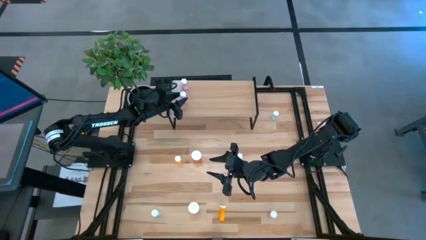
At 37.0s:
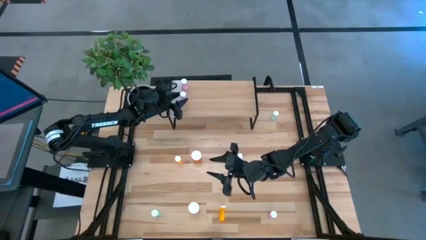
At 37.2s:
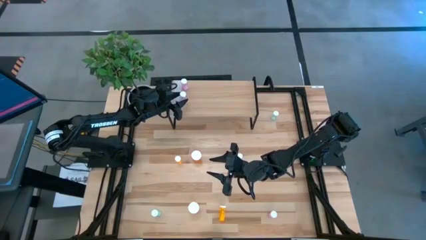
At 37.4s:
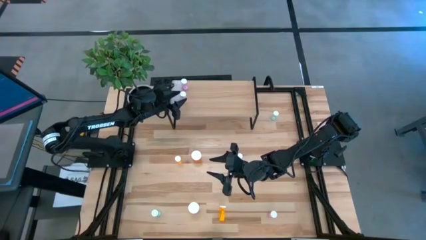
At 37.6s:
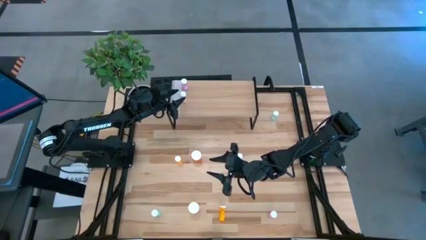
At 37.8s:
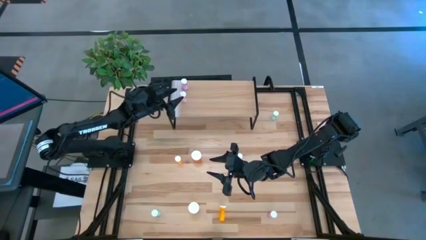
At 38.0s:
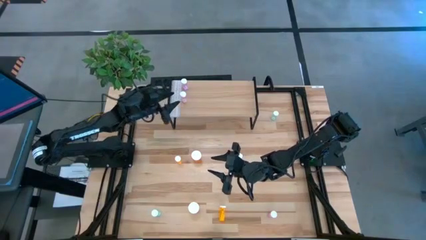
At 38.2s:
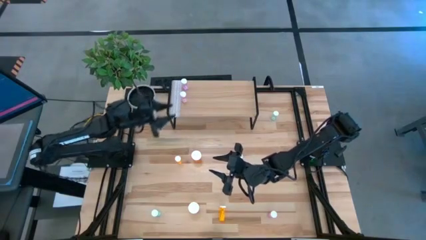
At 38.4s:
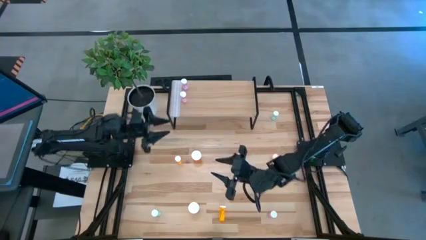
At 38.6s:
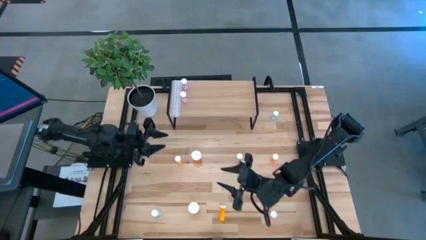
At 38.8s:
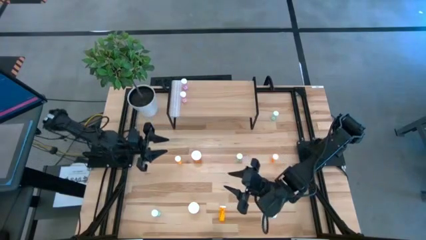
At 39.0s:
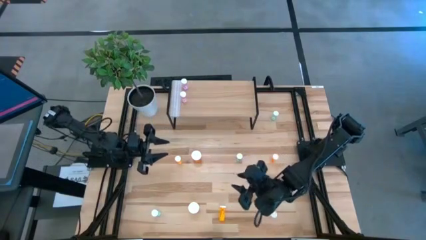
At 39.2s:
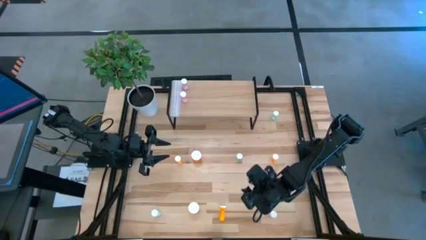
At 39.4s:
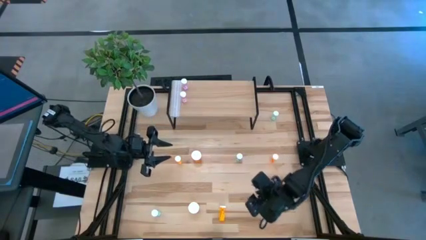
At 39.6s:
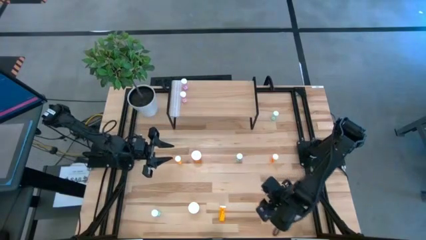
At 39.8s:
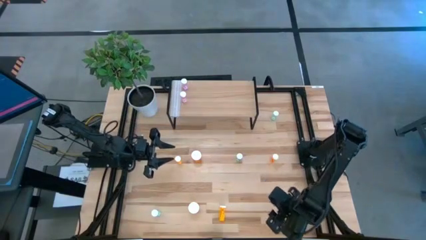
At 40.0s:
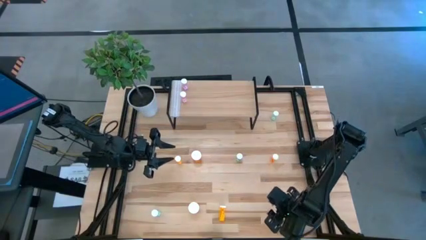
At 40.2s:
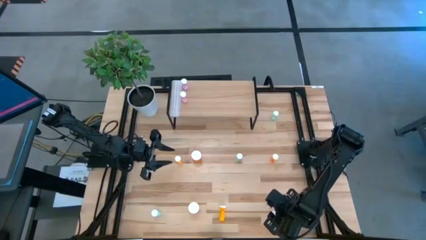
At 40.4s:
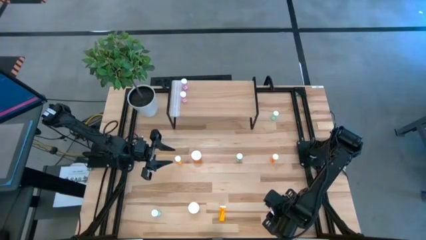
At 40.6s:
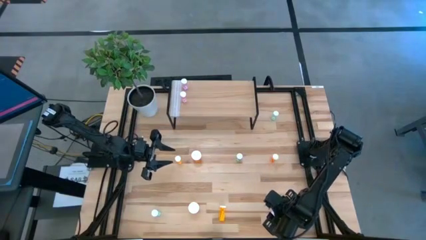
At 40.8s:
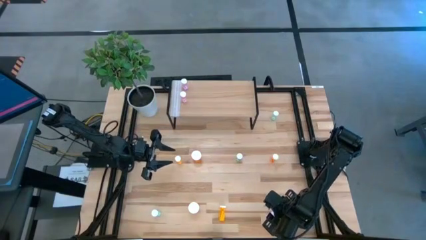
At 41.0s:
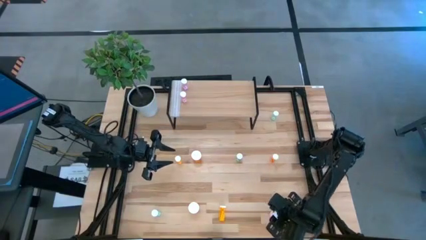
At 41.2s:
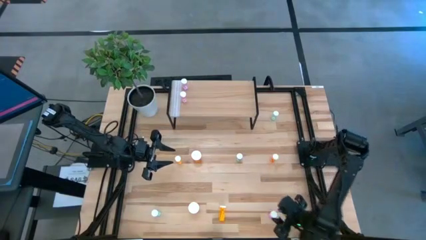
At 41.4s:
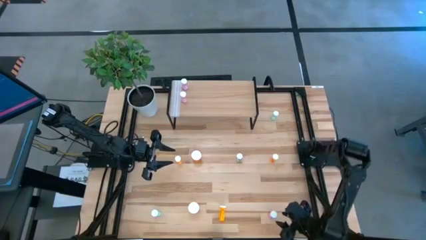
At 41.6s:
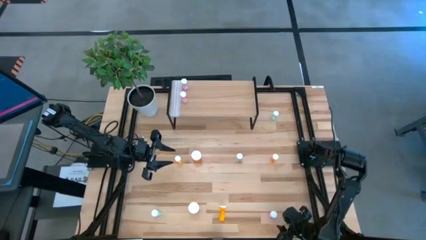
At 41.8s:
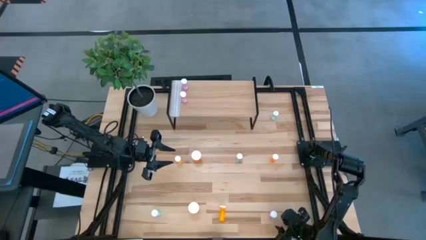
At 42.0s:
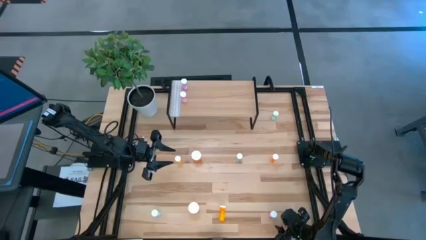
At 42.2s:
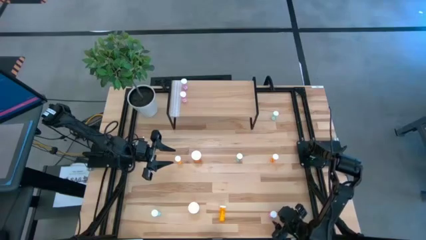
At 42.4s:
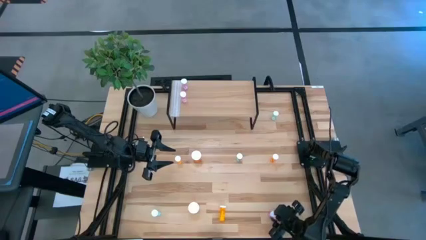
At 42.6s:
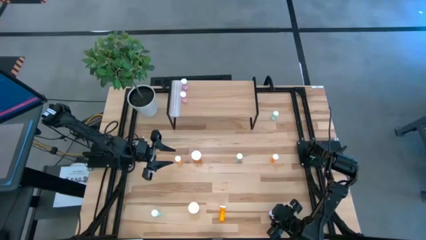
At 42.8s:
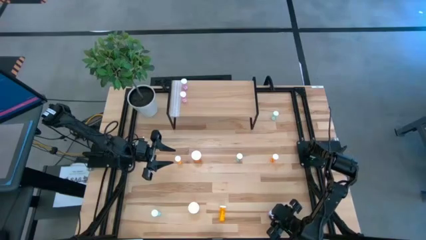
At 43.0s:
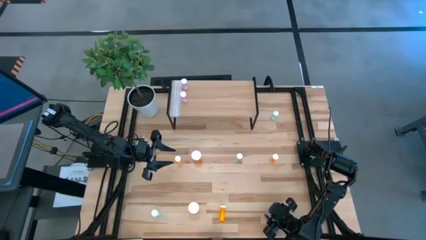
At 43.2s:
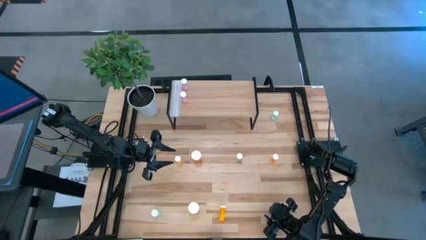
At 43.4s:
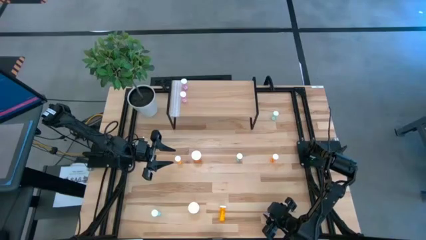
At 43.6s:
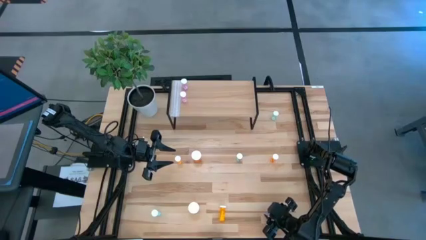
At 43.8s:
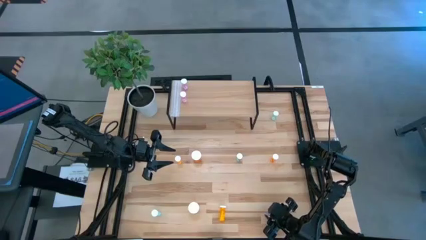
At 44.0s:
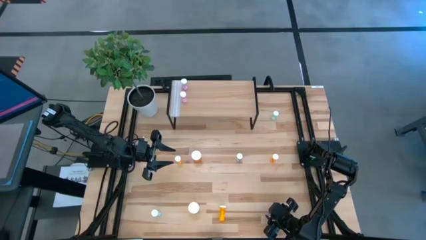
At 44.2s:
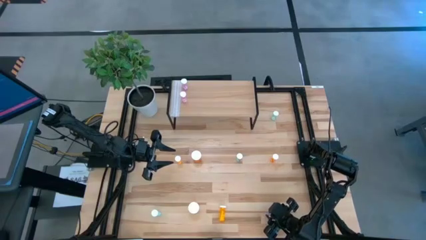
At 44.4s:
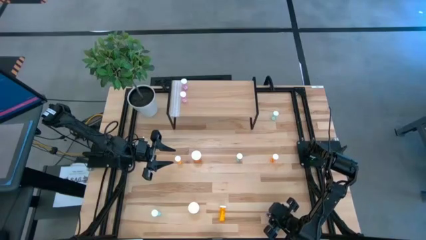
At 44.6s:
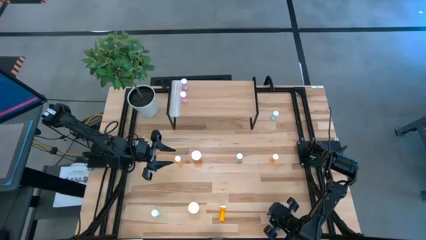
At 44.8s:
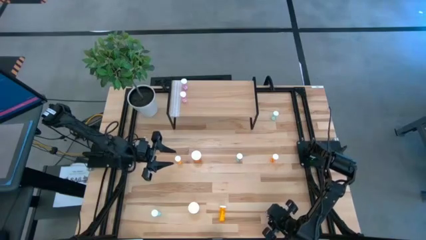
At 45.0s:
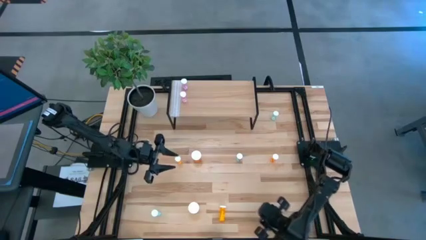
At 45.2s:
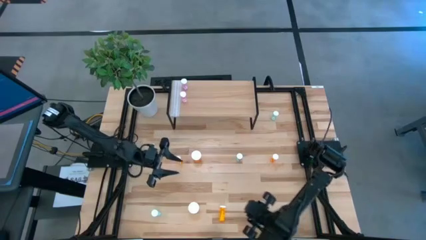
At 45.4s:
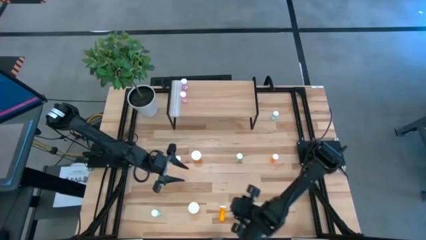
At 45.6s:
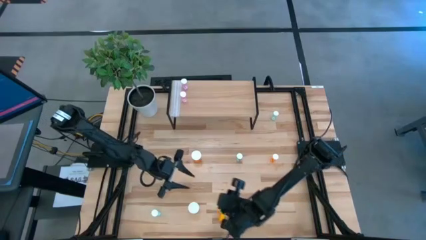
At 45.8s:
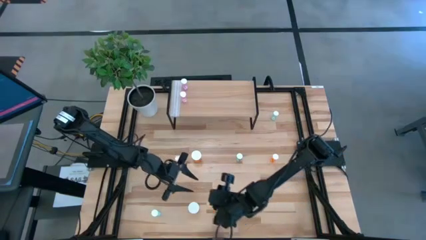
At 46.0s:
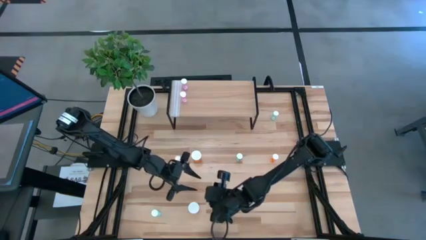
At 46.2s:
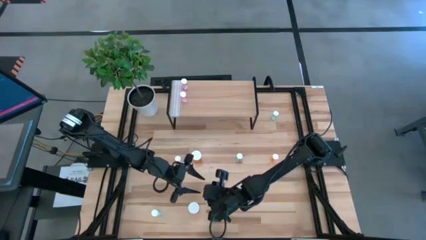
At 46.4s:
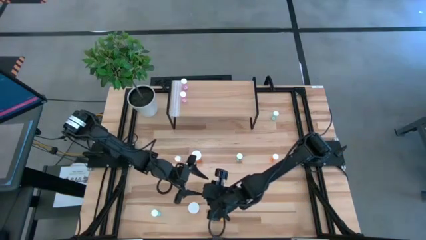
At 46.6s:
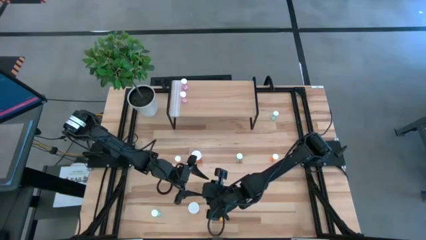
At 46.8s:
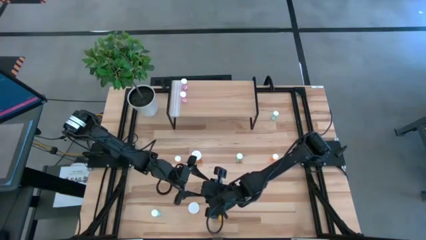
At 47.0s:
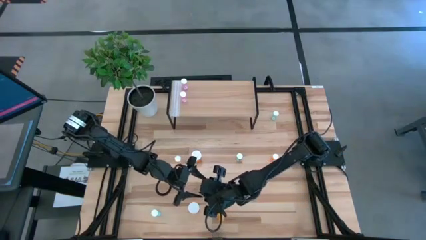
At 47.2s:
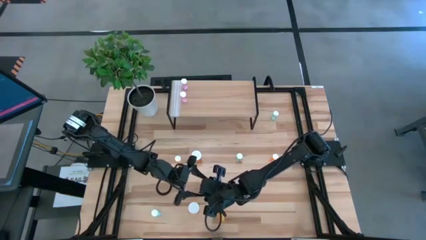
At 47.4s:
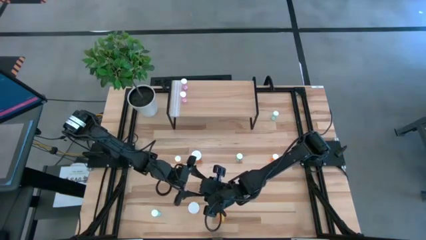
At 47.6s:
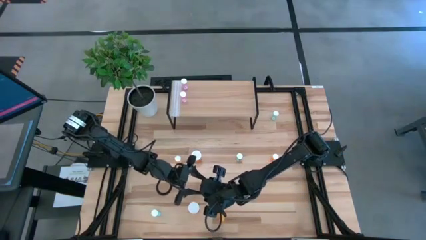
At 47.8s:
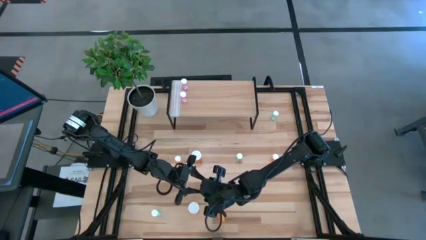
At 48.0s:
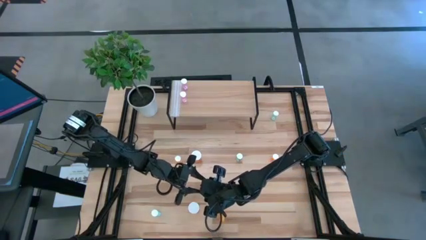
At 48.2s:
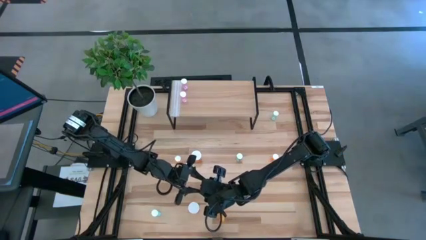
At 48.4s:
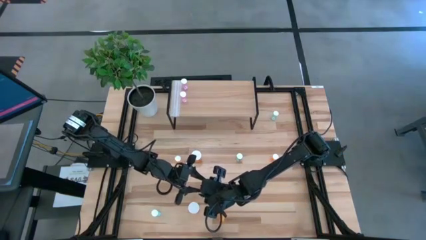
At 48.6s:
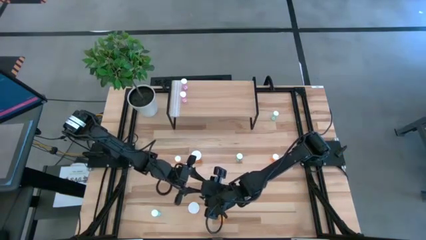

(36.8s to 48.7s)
Task: Pick and place medicine bottles onto shelf by color
Put the pink pill bottle on the shelf aligned with the other pink pill bottles

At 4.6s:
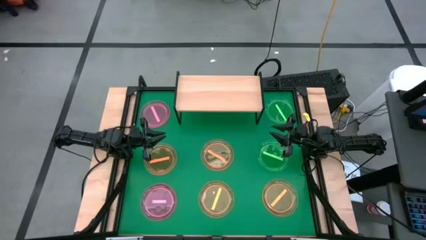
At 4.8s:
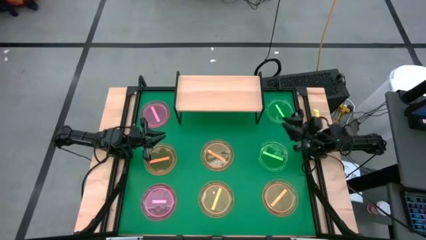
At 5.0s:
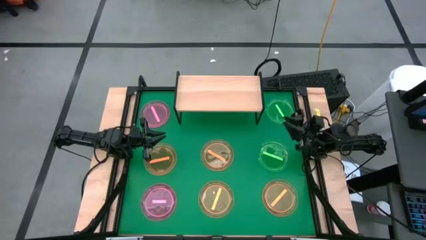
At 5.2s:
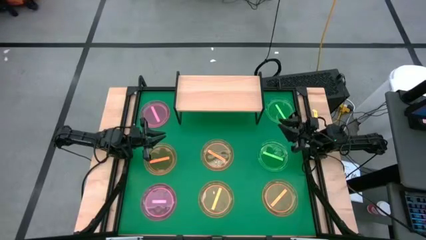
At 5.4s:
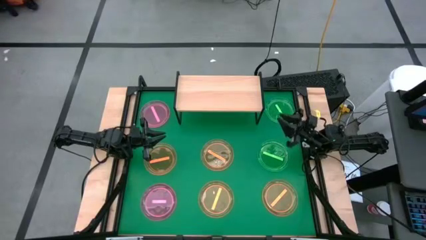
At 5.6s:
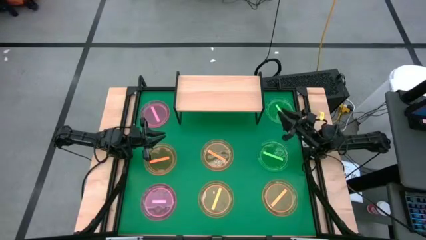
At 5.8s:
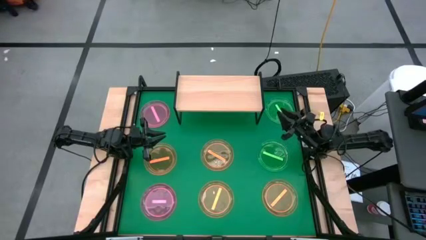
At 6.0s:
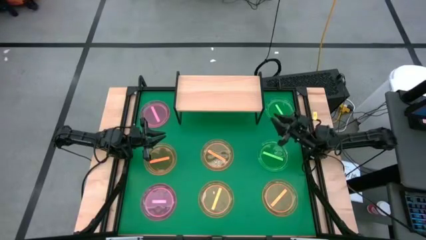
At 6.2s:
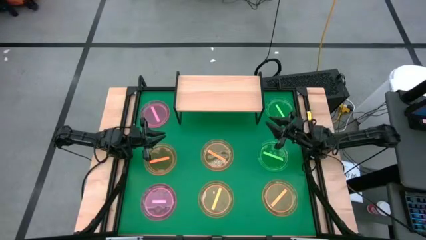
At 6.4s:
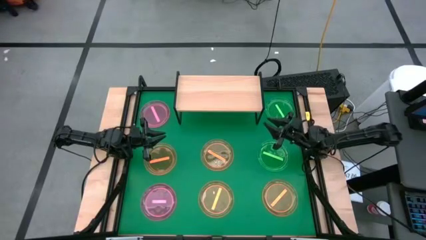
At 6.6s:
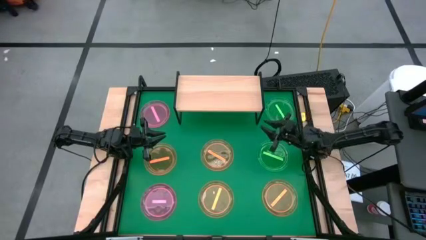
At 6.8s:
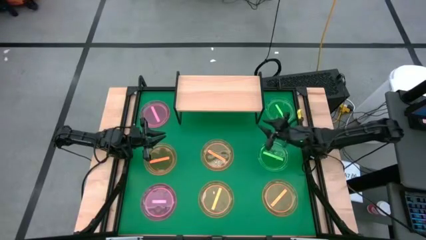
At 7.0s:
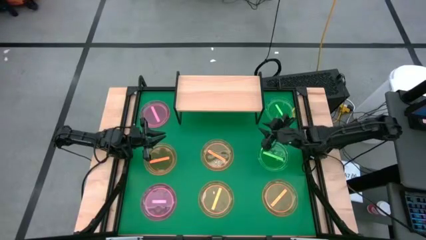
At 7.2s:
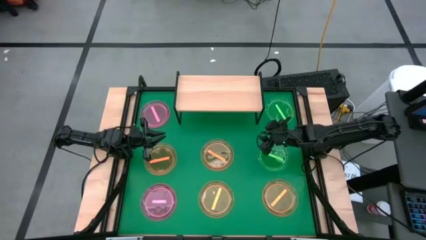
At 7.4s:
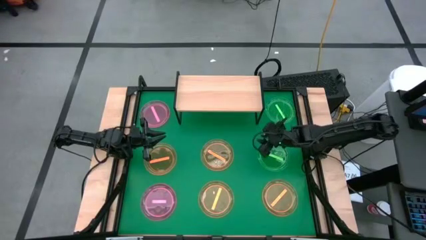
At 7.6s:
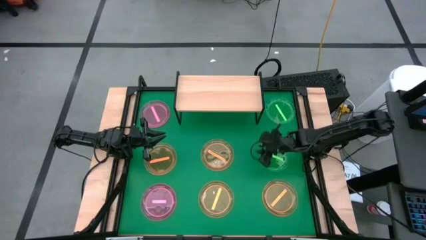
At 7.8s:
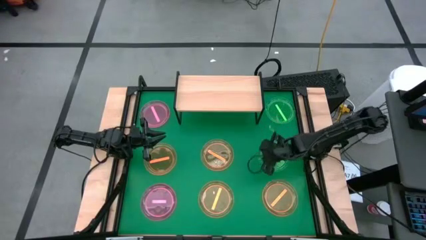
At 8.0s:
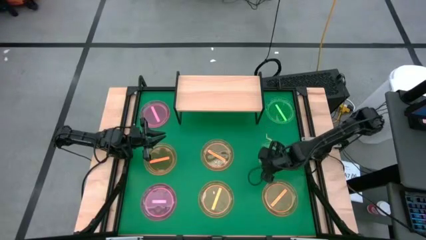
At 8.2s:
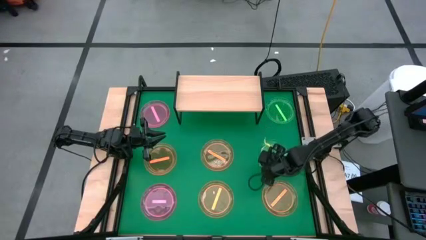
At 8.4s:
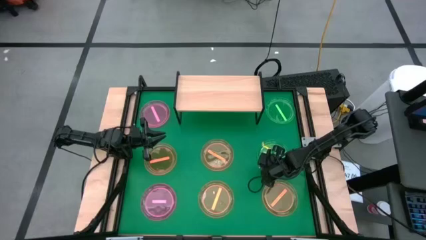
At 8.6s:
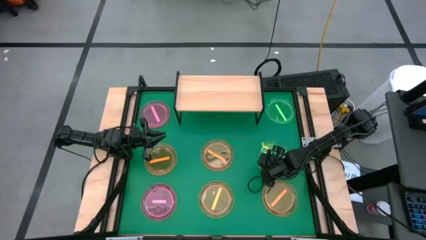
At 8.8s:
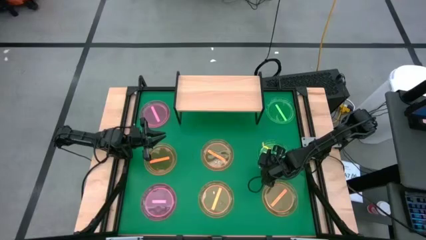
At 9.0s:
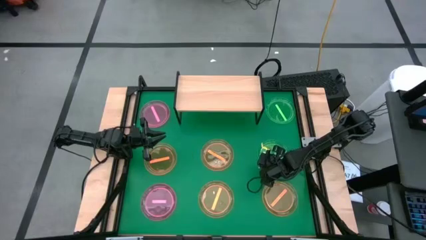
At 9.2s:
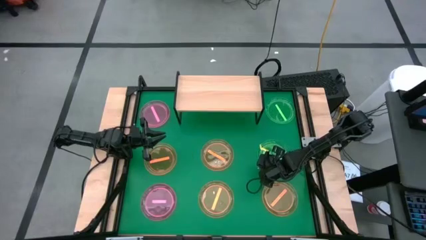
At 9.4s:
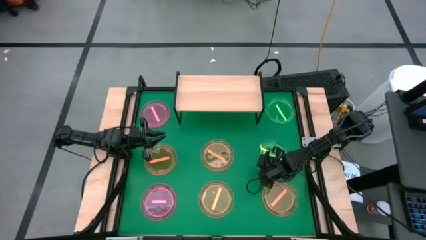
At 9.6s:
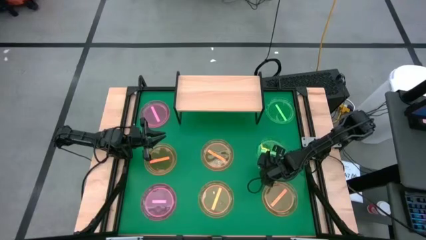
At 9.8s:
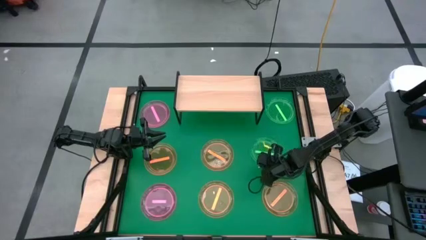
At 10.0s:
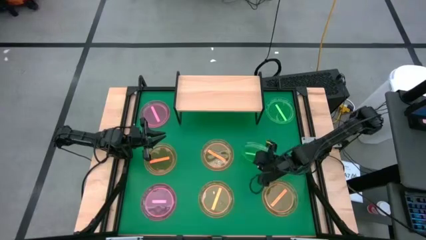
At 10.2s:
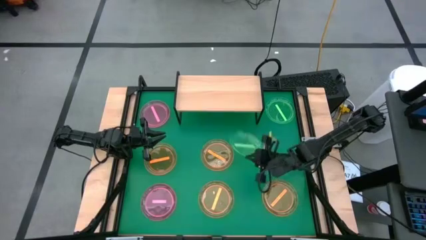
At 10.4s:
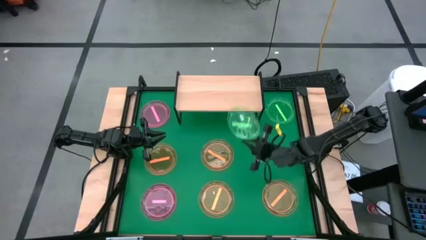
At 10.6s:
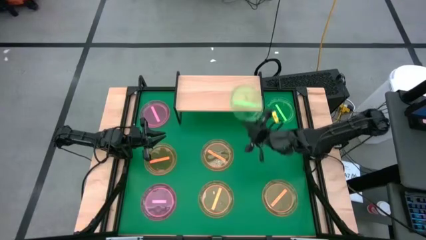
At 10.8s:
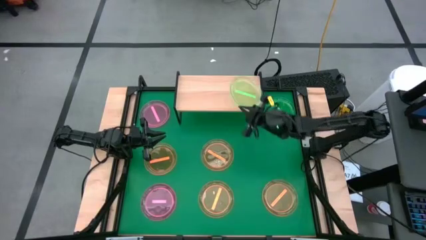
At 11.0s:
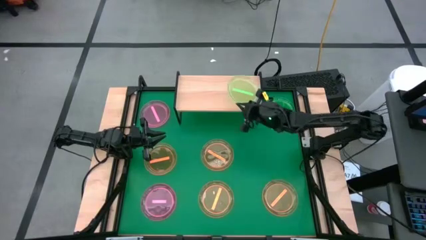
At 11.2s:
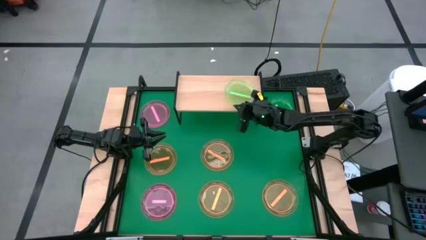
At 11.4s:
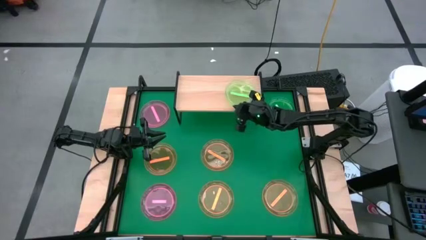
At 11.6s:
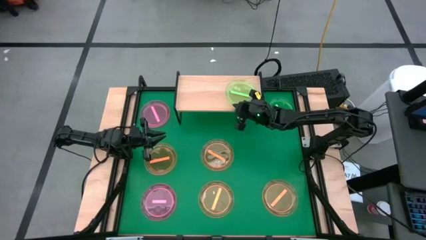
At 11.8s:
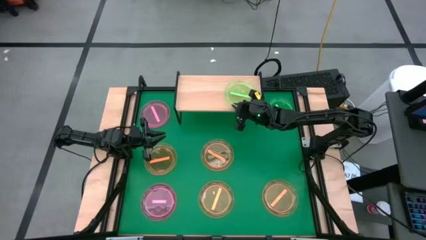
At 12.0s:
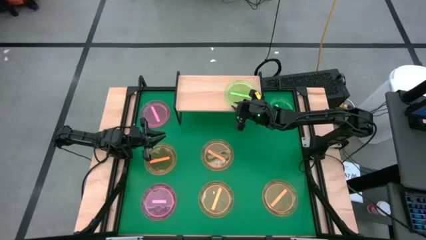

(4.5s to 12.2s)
Task: Place and stack plates onto a shelf
Put the green plate on the shelf
